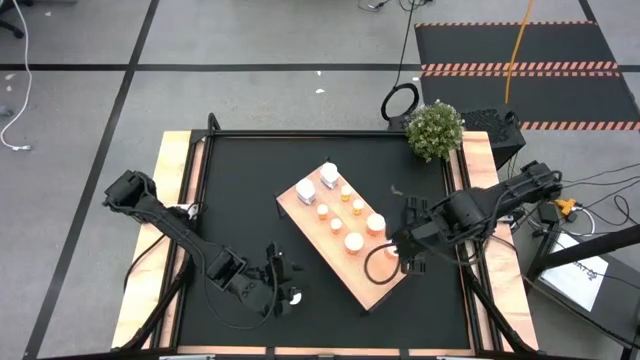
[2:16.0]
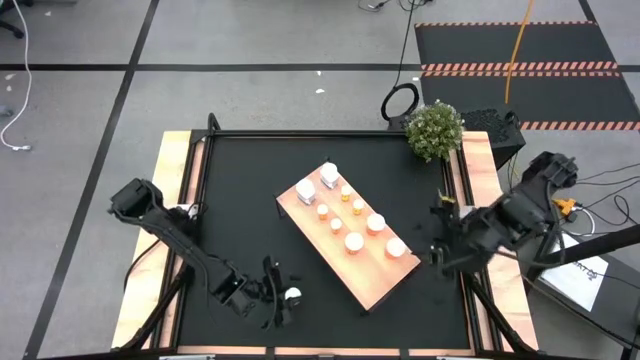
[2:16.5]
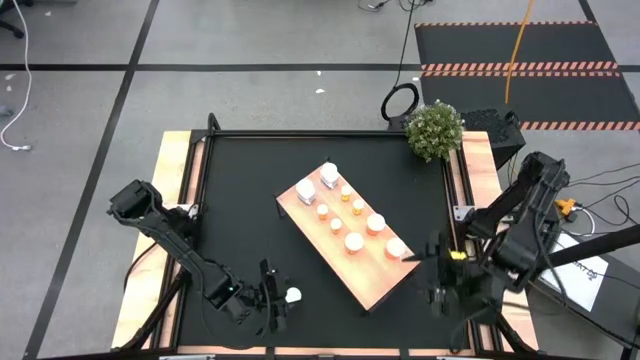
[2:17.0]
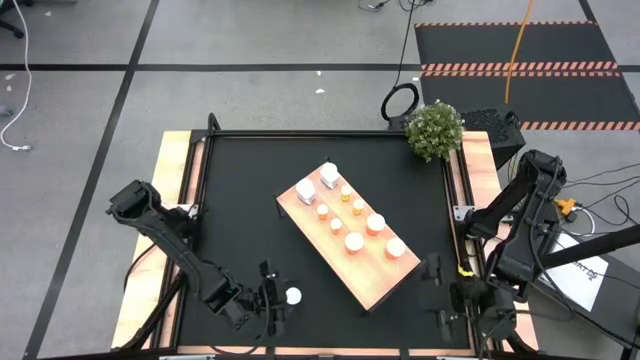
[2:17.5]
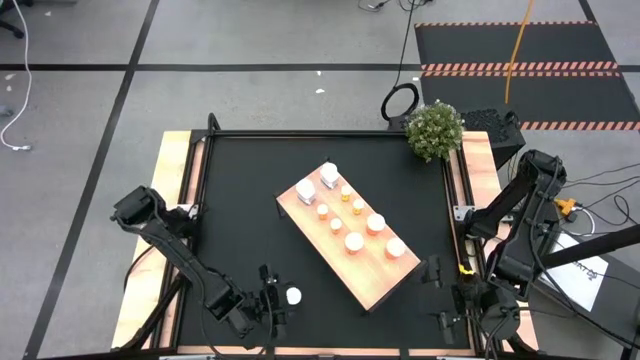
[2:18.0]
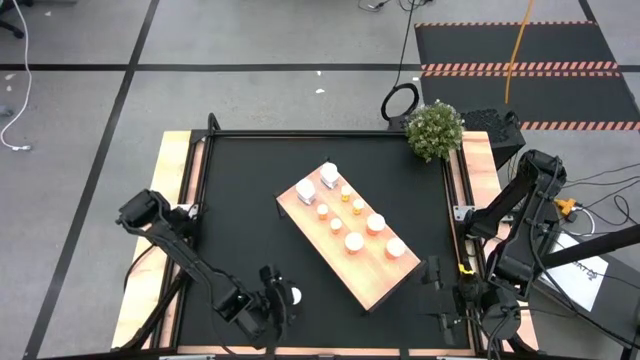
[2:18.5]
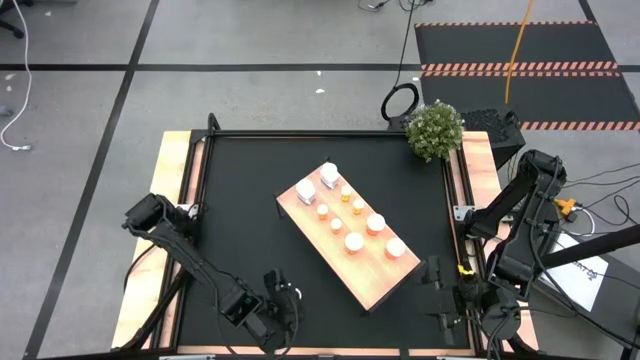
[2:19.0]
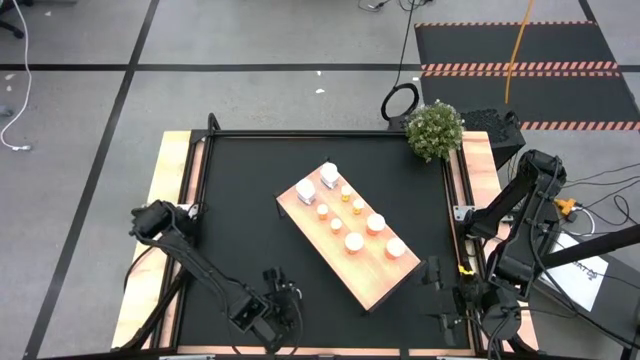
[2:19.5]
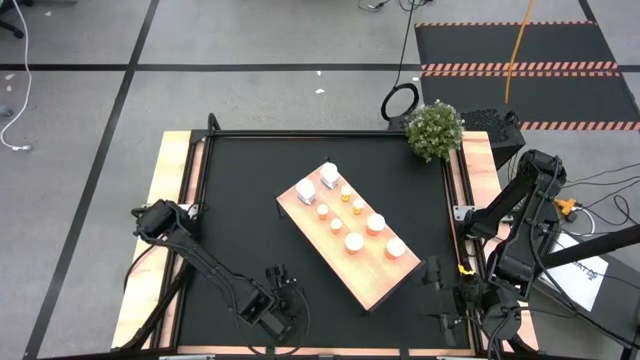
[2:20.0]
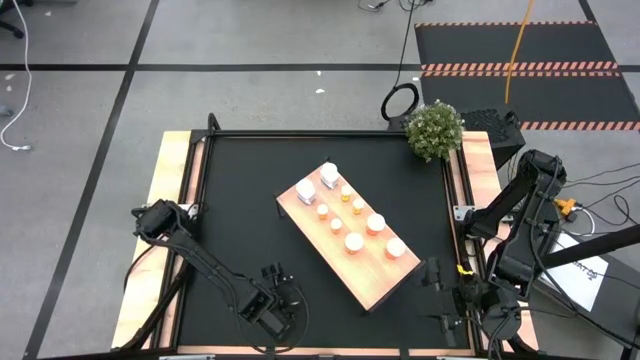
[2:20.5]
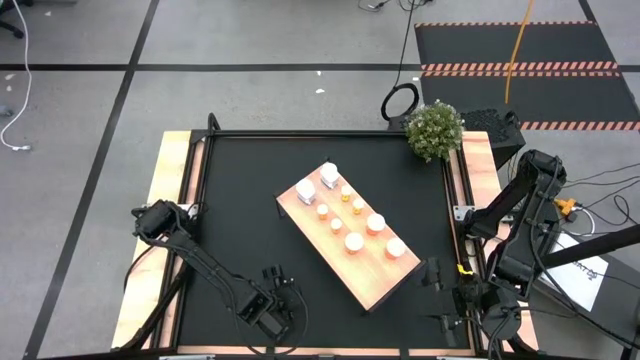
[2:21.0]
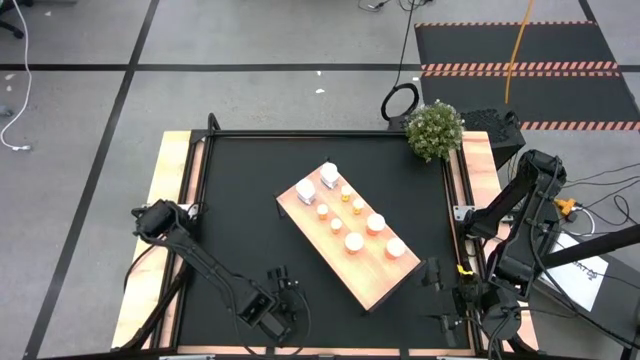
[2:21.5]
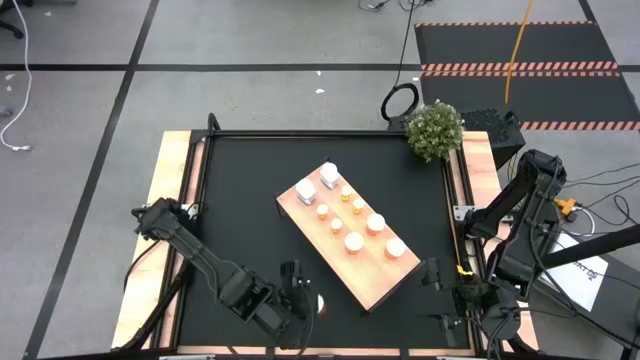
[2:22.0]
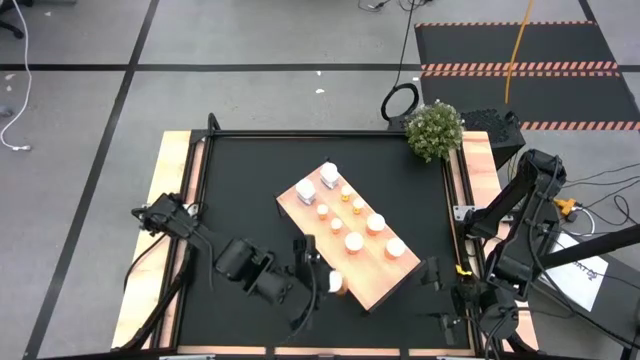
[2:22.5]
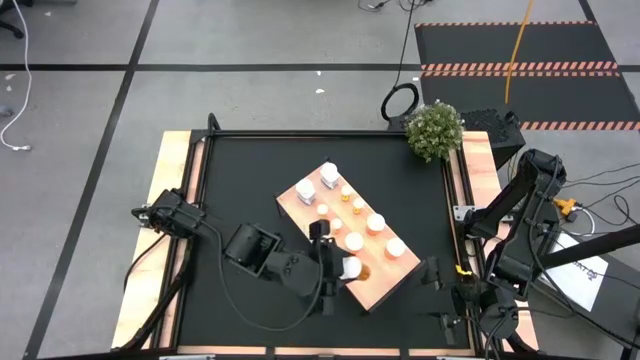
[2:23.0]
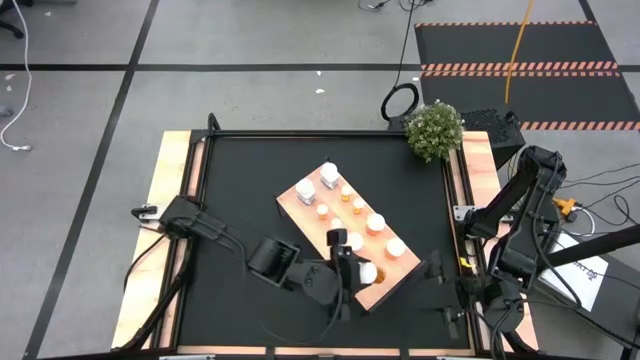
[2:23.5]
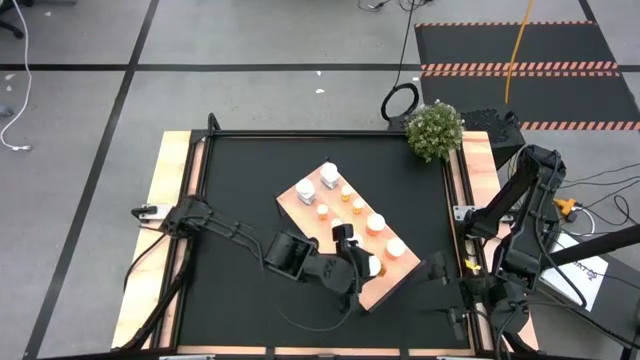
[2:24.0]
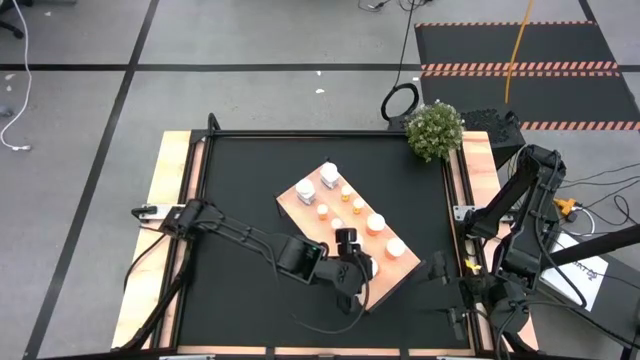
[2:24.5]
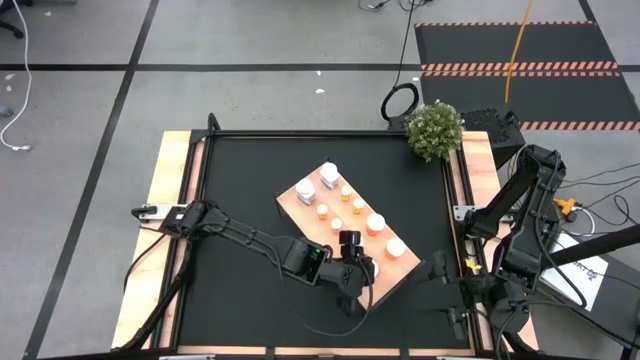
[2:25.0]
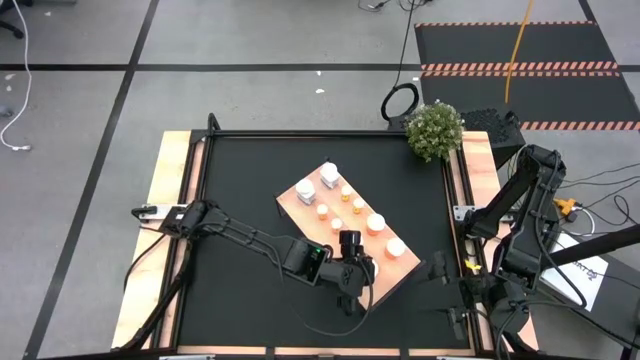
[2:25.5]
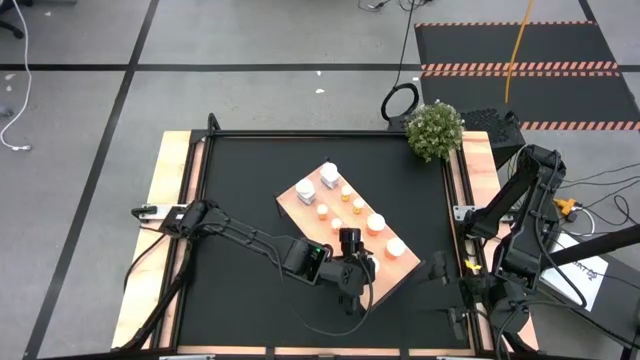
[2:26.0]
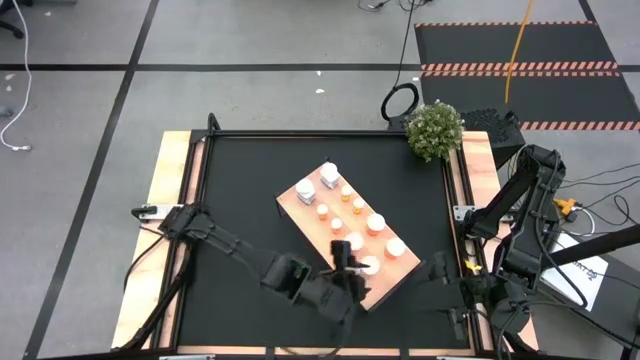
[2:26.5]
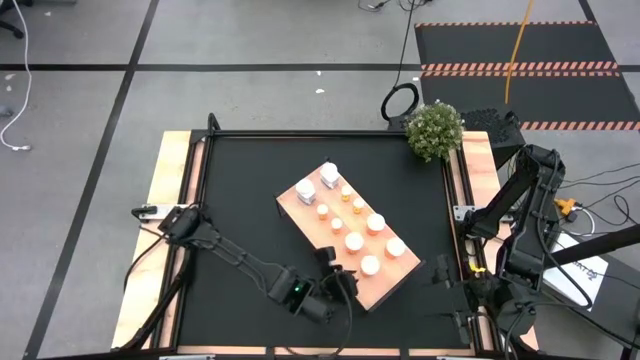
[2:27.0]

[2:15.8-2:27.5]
Task: Pick and place medicine bottles onto shelf by color
Put the large orange pill bottle on the shelf aligned with the other large orange pill bottle

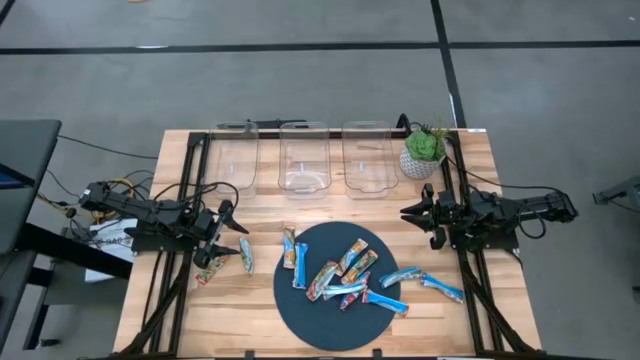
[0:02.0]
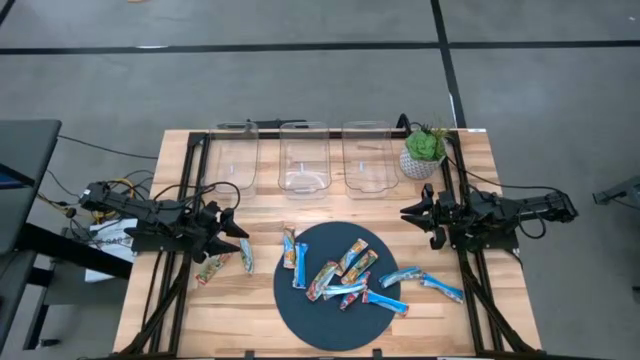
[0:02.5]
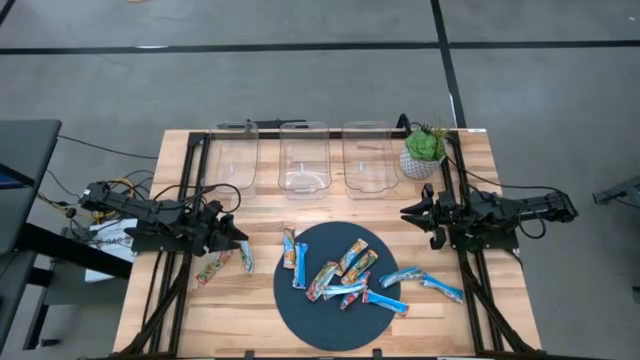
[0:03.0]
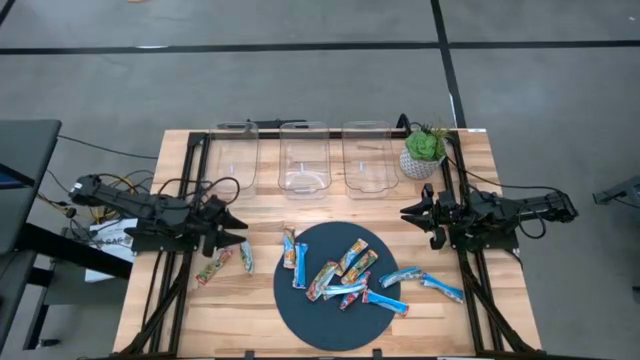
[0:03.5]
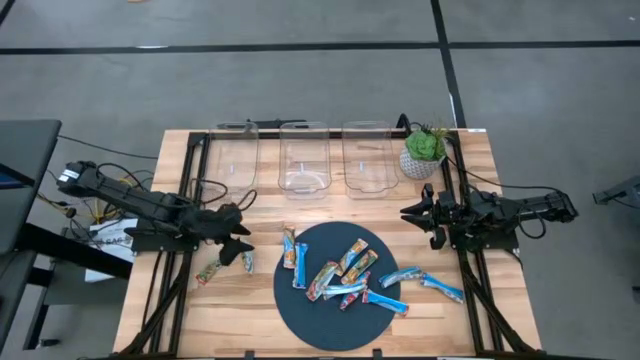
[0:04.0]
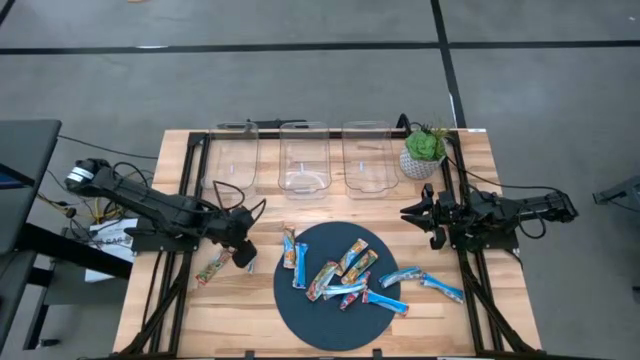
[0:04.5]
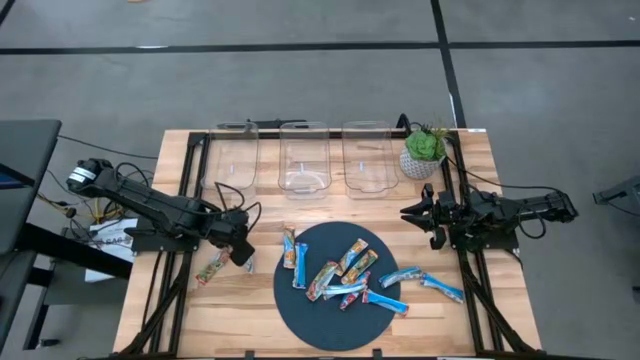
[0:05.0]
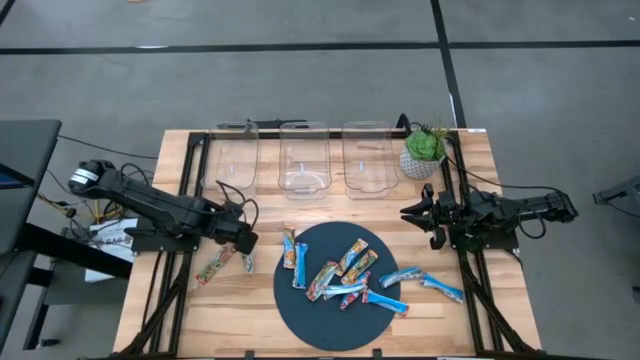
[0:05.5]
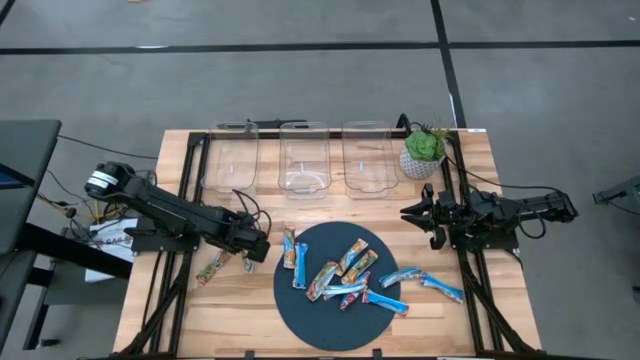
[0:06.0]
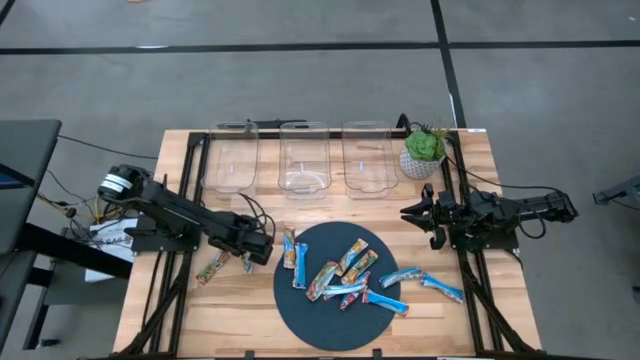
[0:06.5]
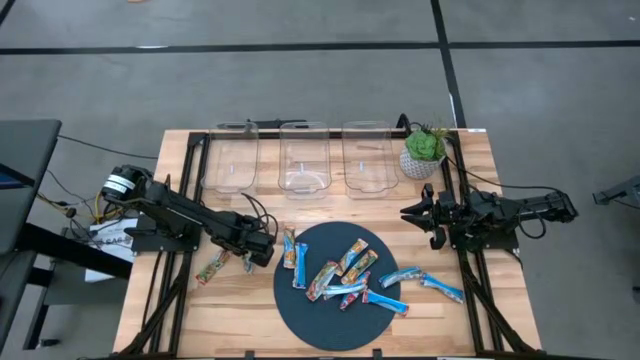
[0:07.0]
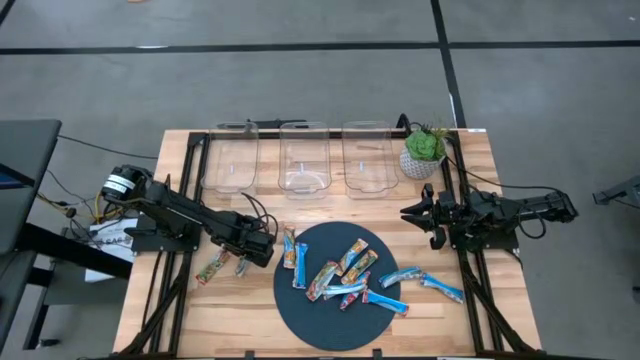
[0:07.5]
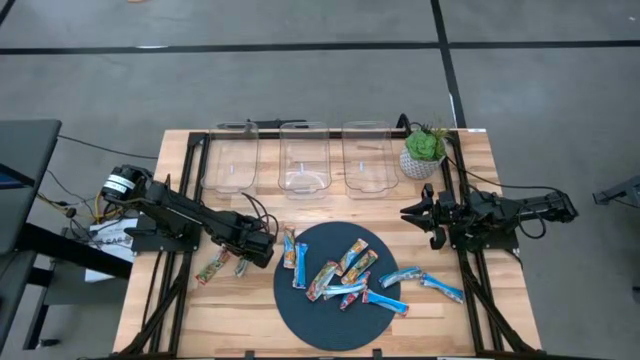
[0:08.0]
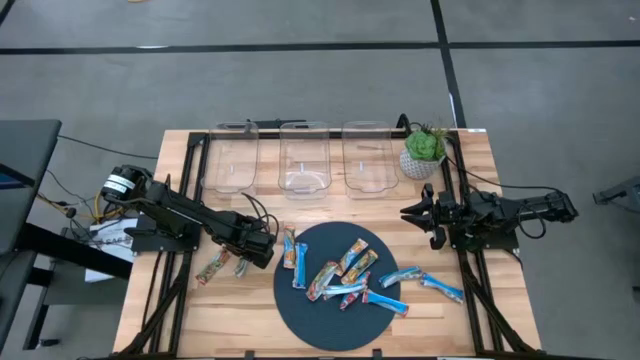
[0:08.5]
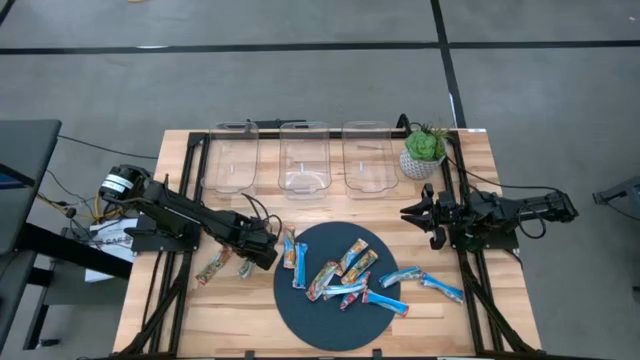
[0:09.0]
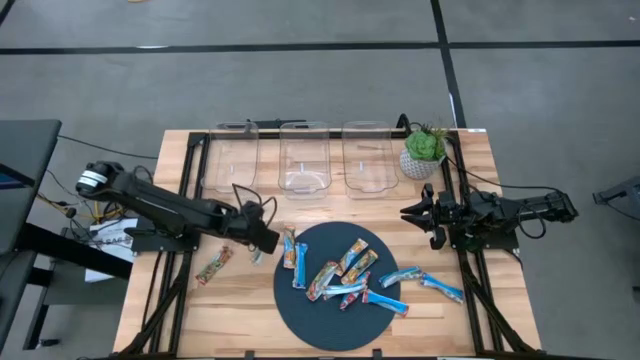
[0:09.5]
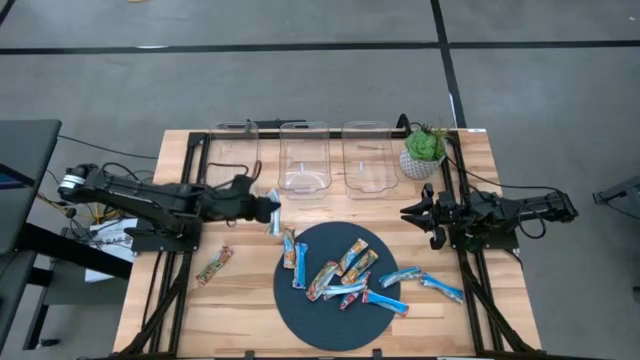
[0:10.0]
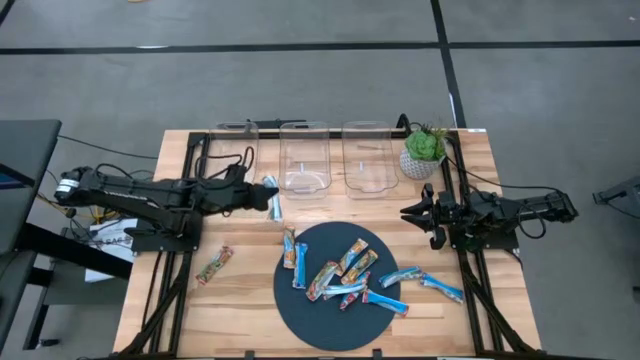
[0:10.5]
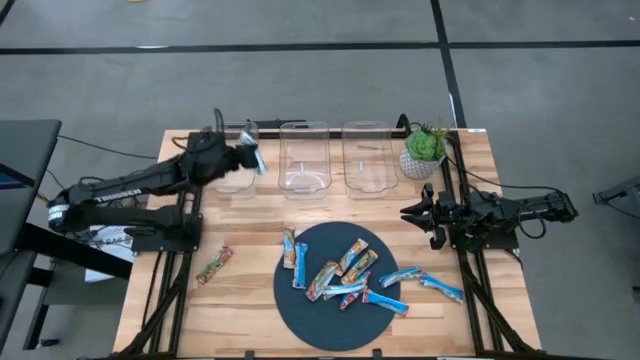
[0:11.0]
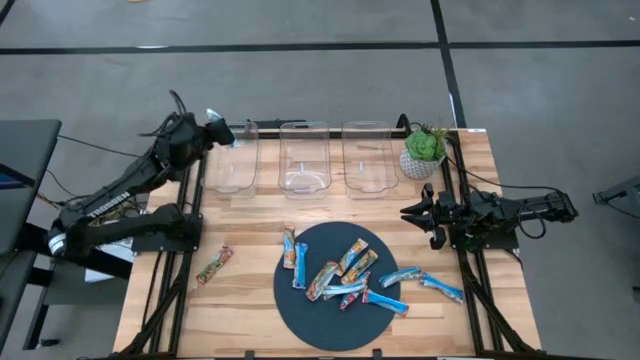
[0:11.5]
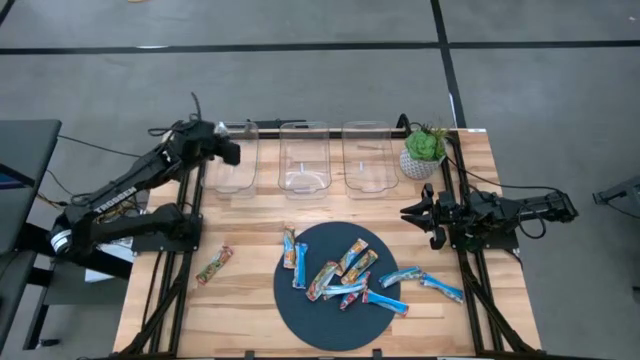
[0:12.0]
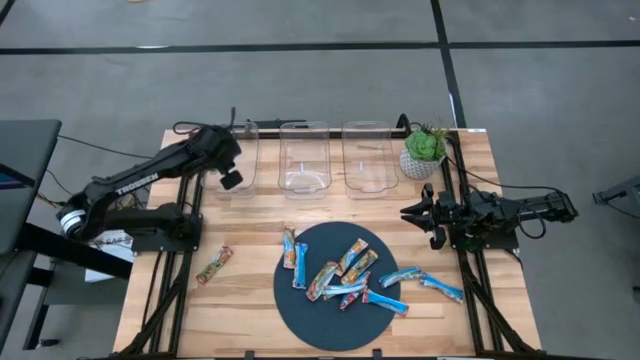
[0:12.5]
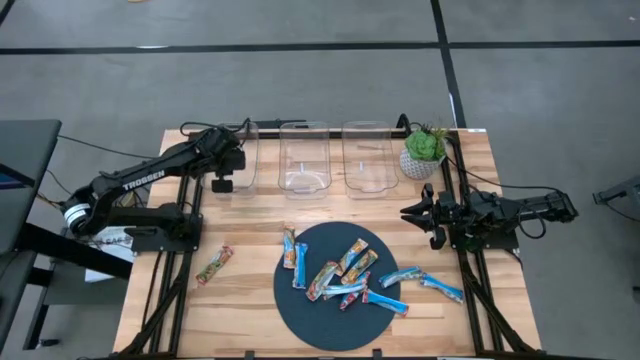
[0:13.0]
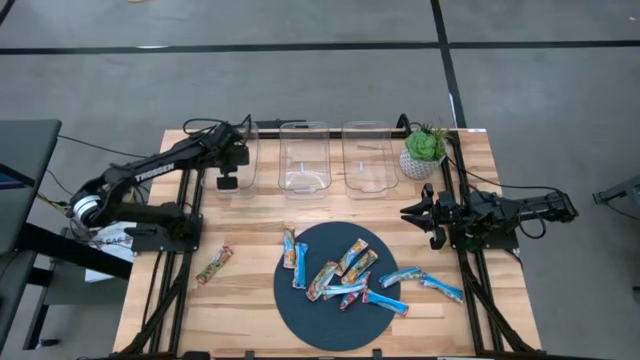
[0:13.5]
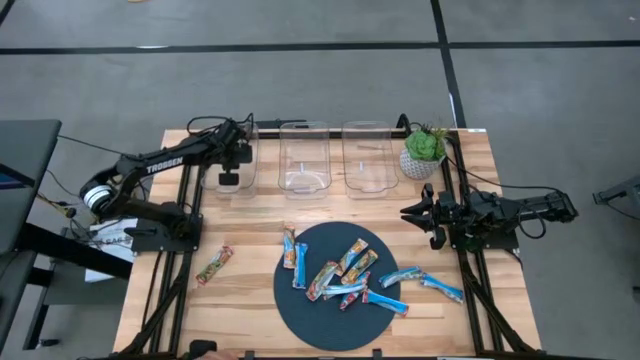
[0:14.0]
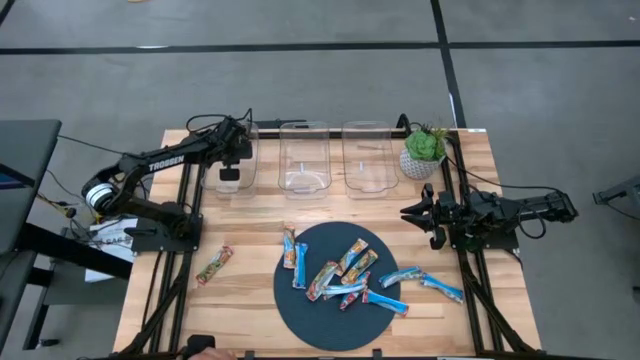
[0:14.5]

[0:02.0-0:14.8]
Task: Pick and place Granola Bars by type
Put the yellow granola bar into the left transparent bin
